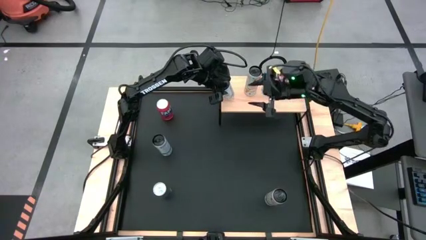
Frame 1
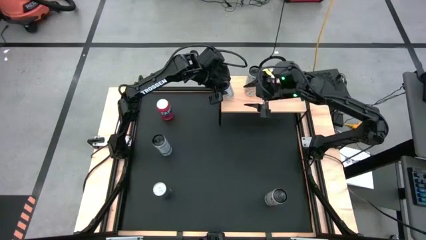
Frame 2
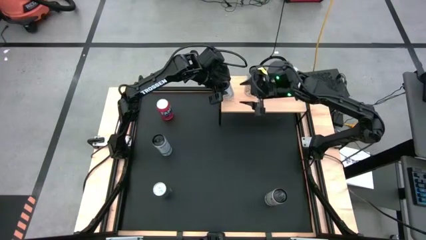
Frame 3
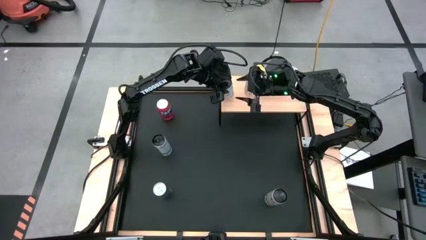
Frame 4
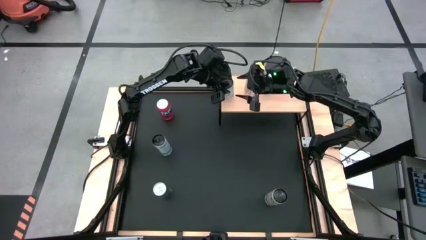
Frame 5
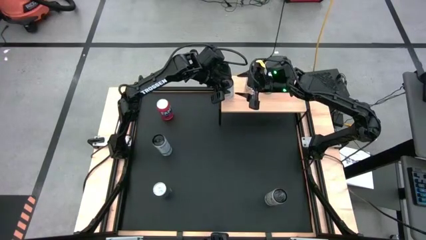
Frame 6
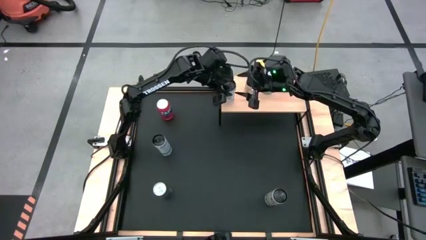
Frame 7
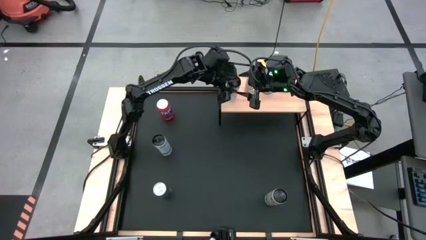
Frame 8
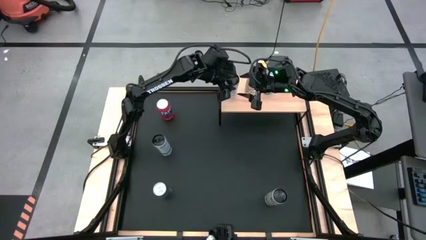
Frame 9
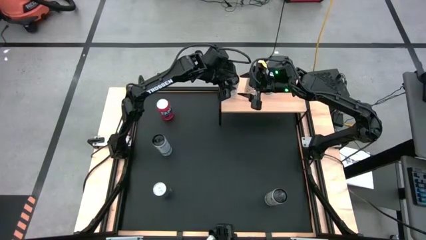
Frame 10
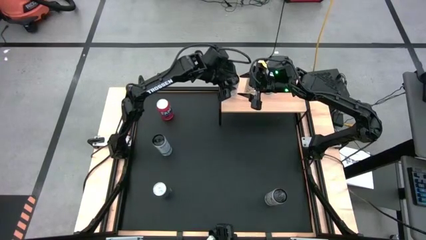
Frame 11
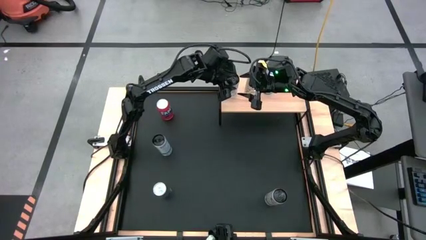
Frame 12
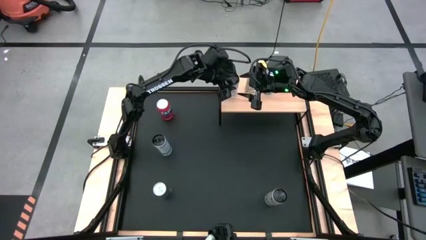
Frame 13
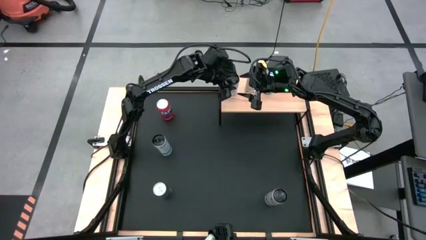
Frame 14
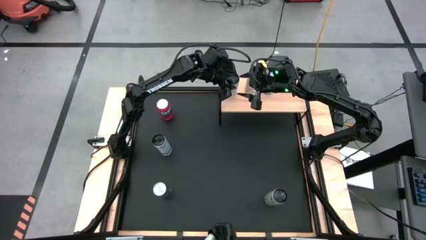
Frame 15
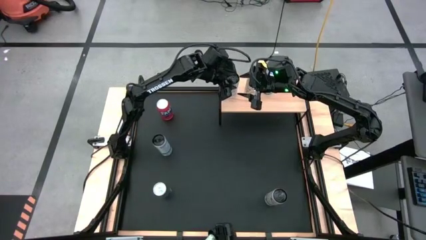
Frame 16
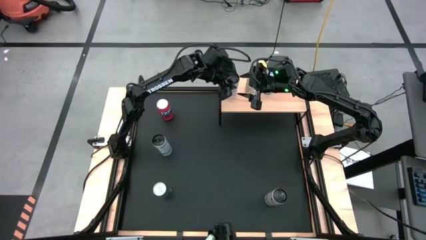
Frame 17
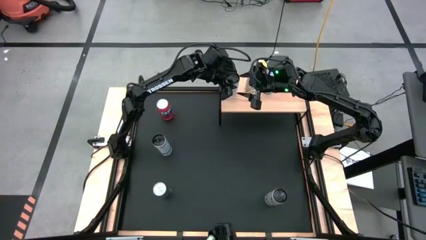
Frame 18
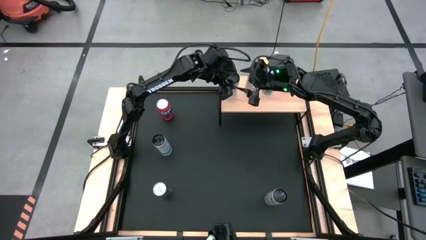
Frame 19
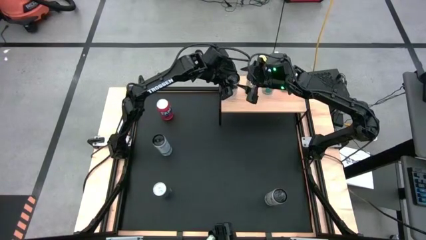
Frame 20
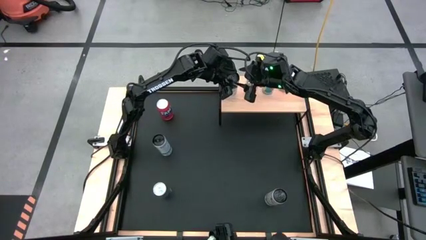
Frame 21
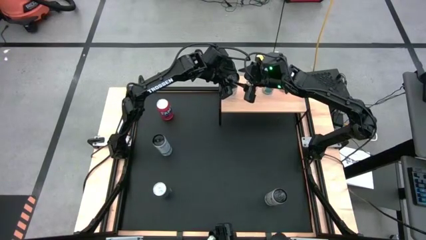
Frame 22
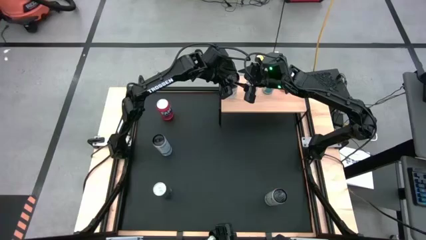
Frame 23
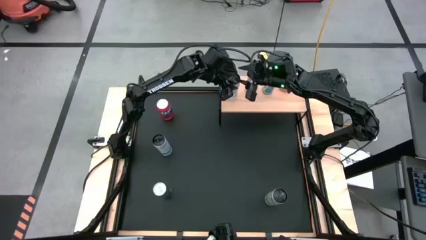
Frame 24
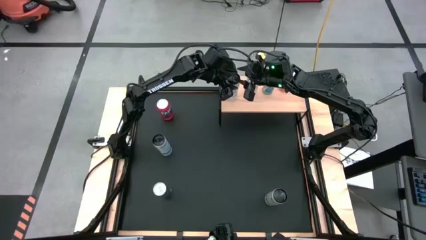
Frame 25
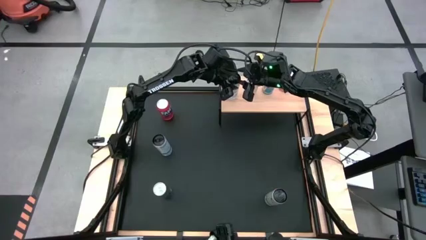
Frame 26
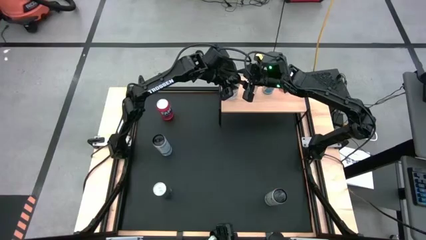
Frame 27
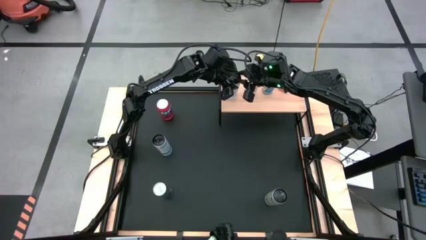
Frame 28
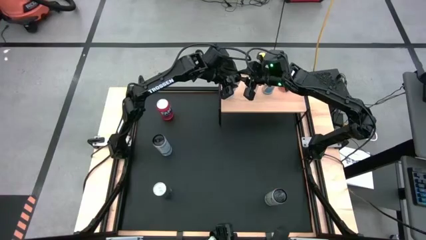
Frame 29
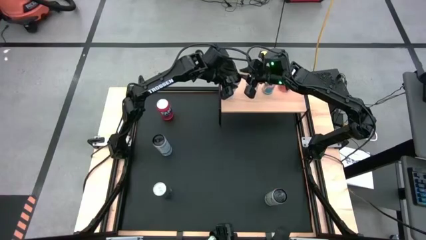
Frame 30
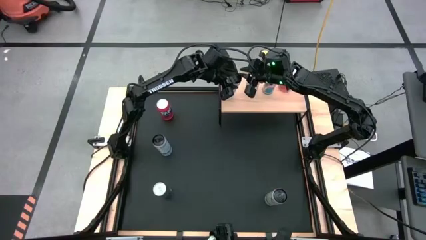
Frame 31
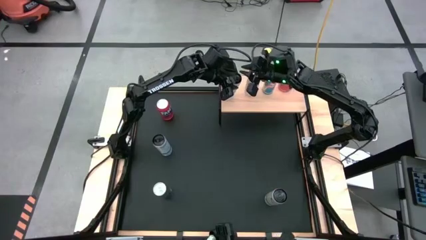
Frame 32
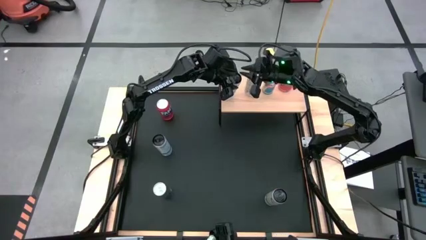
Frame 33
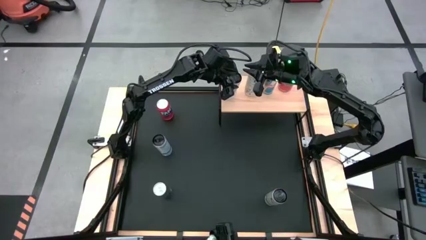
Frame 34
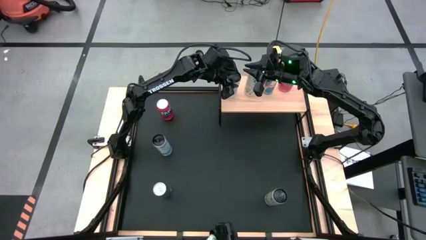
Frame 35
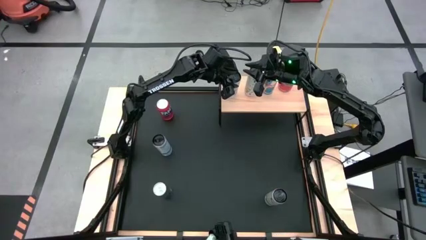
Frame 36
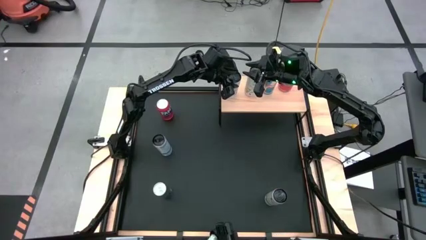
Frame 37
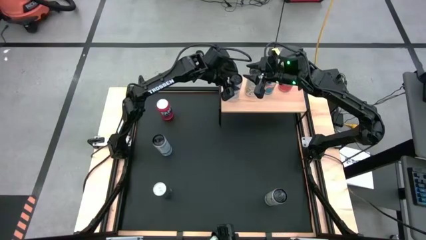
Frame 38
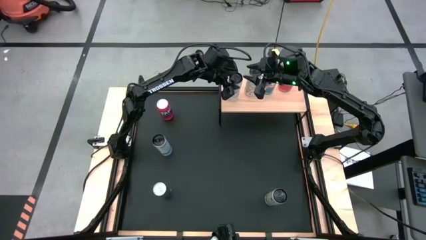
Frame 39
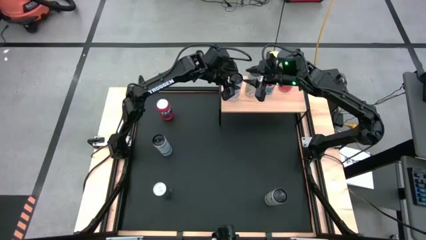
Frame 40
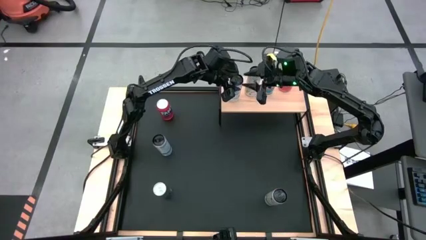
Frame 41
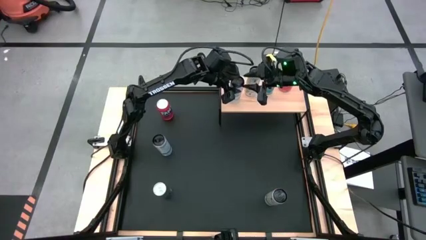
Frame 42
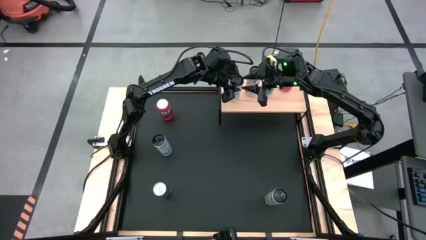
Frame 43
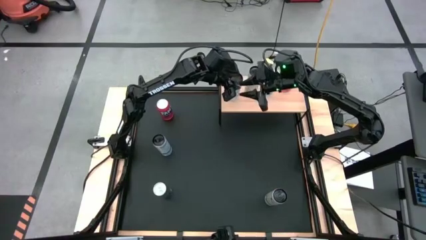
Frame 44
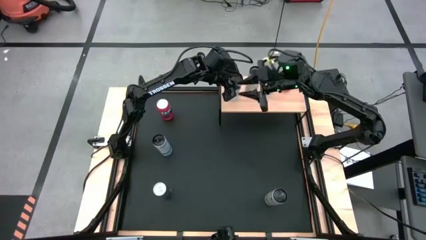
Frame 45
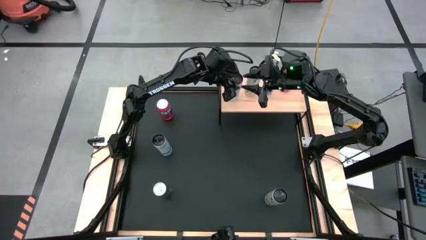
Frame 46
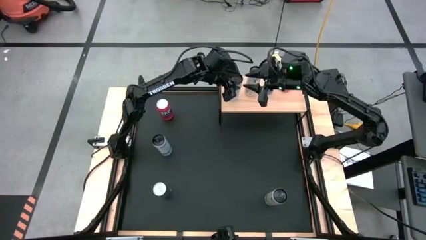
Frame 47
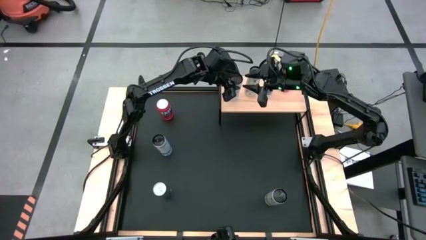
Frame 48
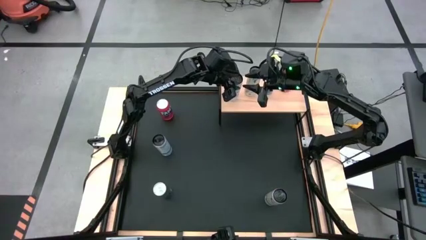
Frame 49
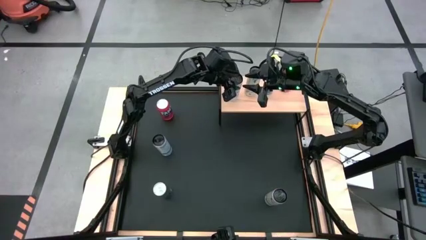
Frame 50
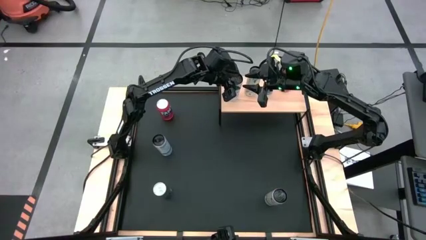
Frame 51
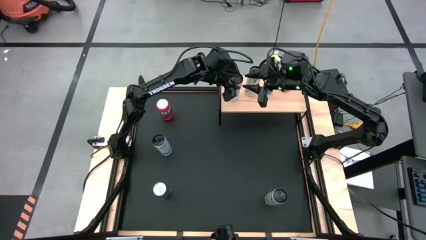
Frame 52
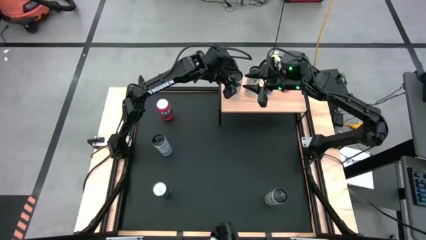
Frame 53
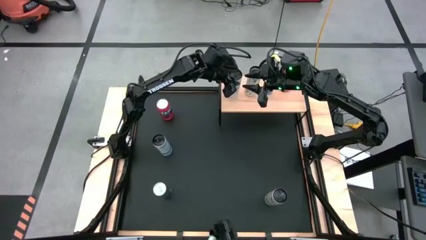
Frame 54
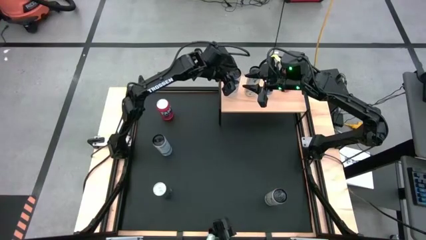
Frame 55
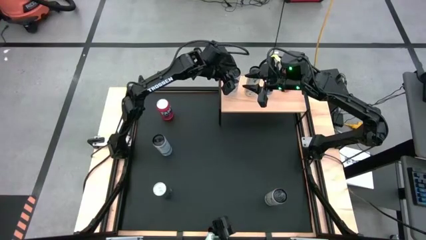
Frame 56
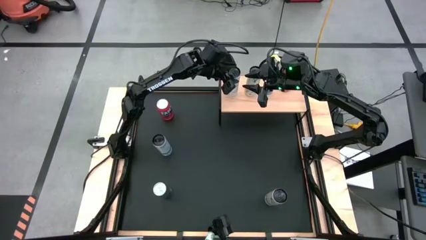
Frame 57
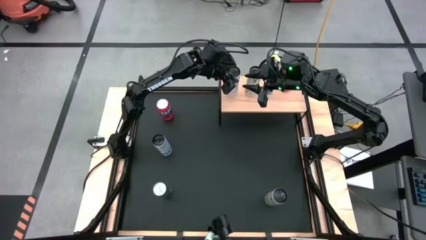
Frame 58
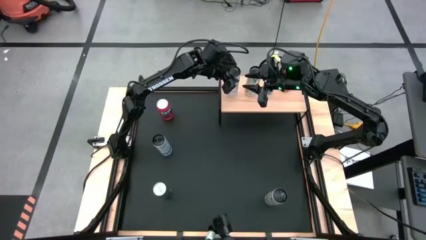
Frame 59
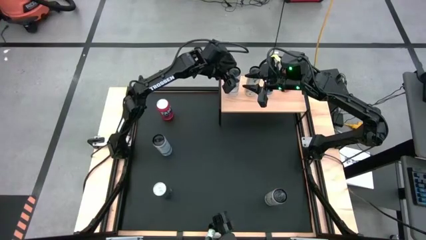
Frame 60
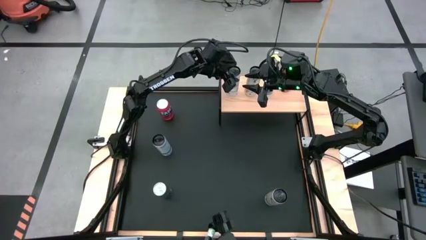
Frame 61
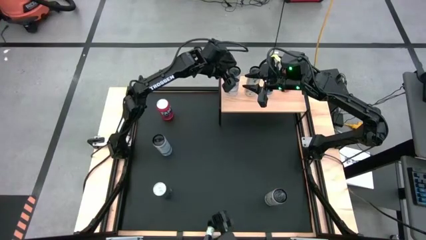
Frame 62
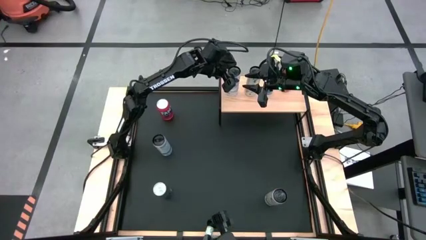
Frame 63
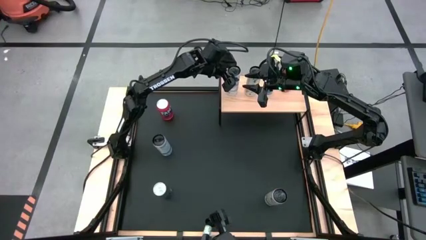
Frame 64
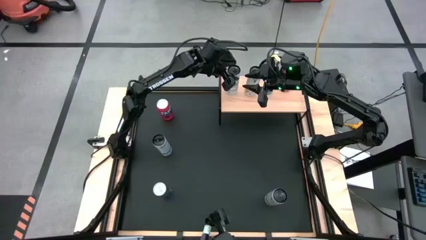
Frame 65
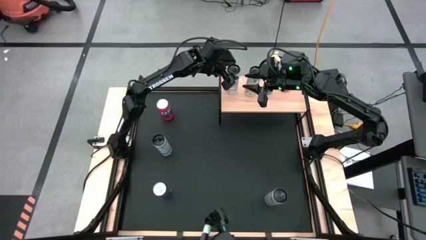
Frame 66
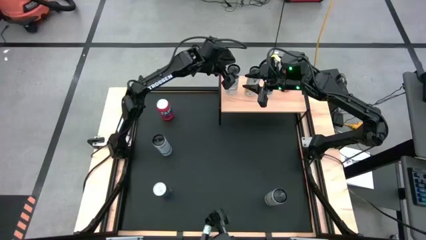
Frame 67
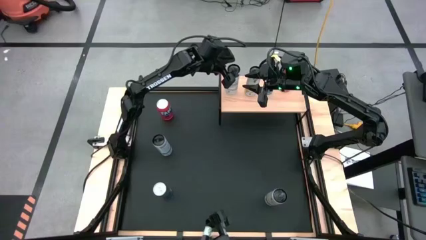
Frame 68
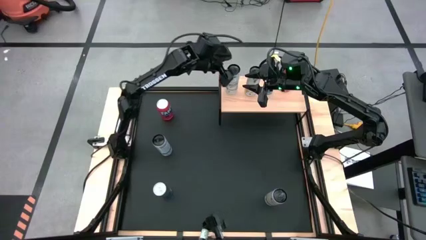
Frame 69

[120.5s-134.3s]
Task: Place canned beverage on shelf
Put the bottom white blue soda can on the shelf
